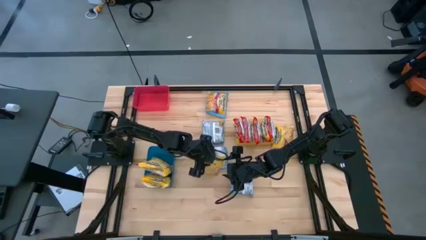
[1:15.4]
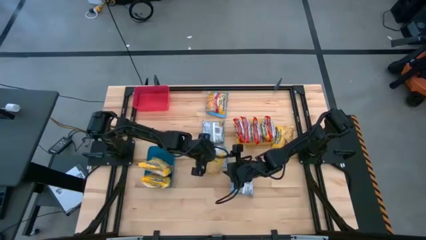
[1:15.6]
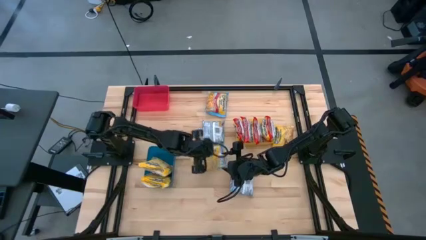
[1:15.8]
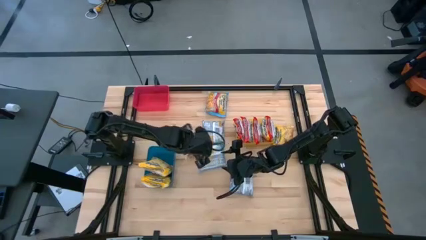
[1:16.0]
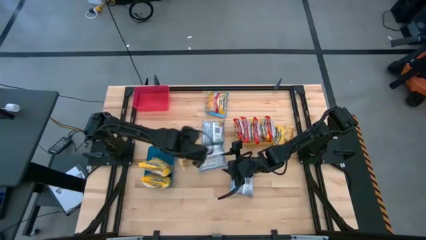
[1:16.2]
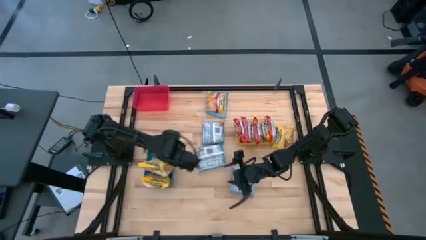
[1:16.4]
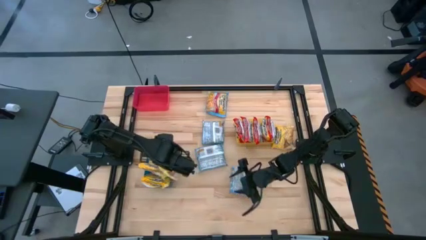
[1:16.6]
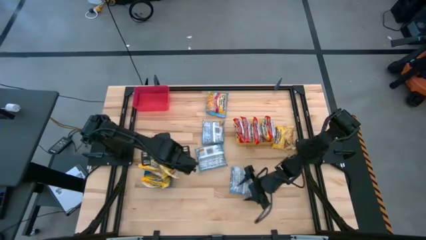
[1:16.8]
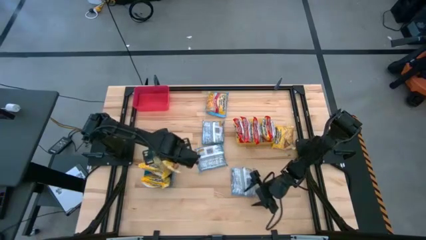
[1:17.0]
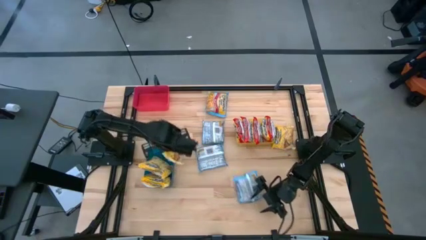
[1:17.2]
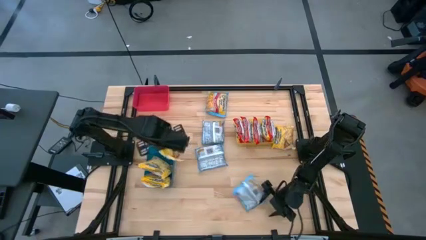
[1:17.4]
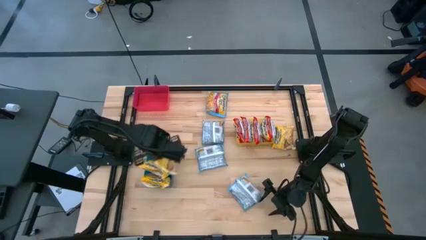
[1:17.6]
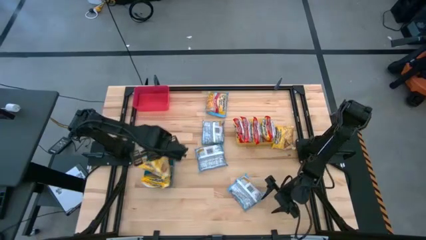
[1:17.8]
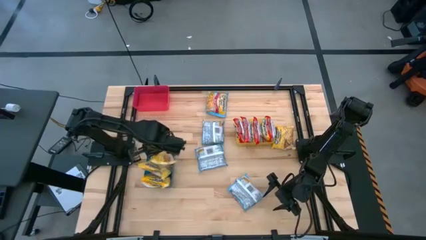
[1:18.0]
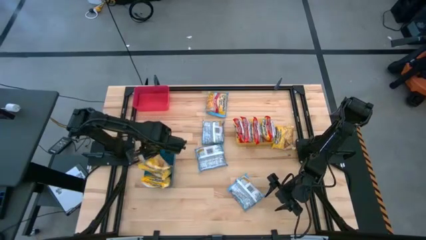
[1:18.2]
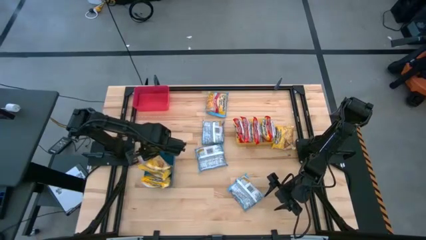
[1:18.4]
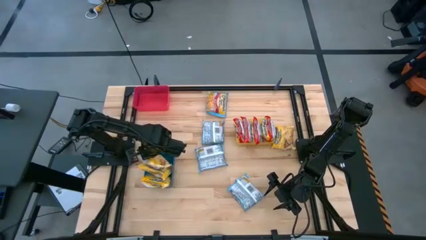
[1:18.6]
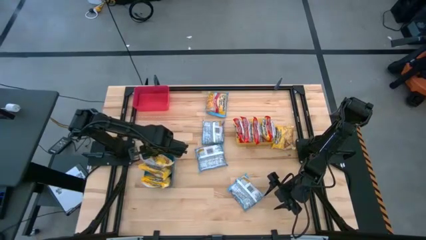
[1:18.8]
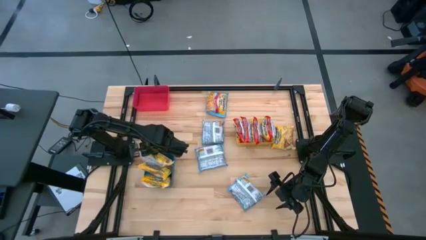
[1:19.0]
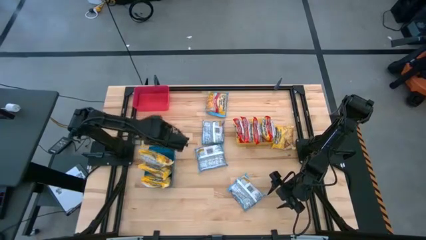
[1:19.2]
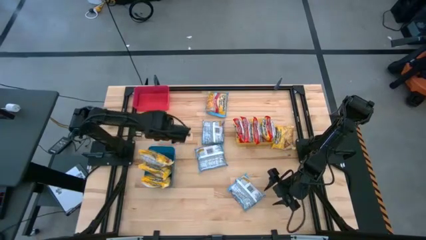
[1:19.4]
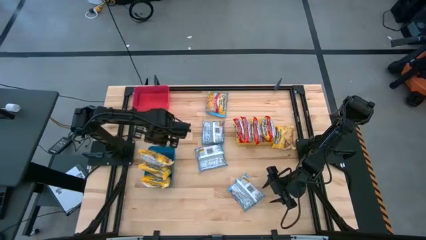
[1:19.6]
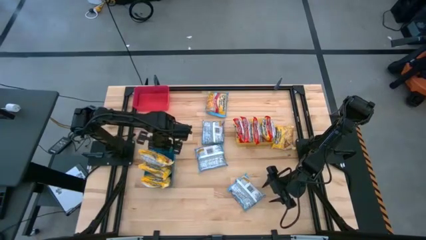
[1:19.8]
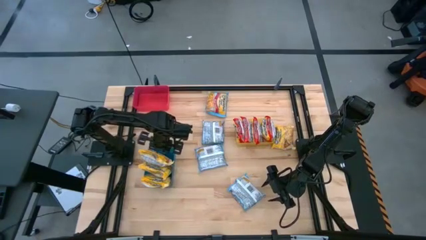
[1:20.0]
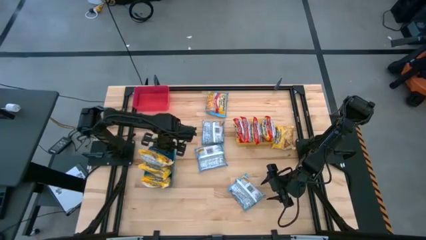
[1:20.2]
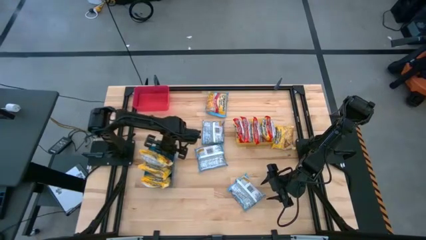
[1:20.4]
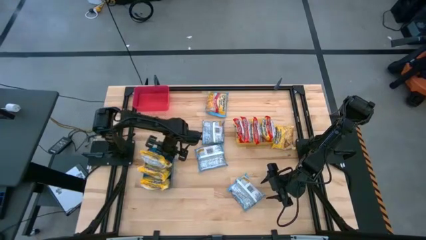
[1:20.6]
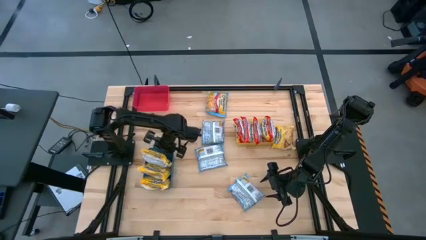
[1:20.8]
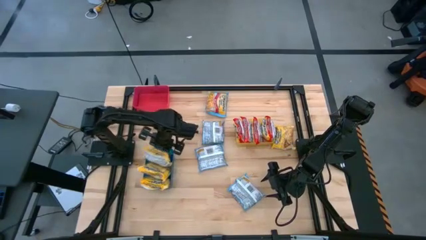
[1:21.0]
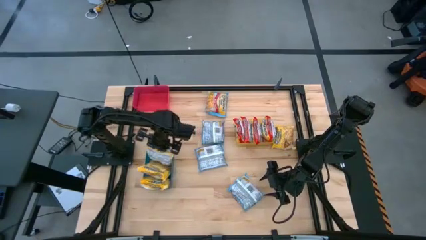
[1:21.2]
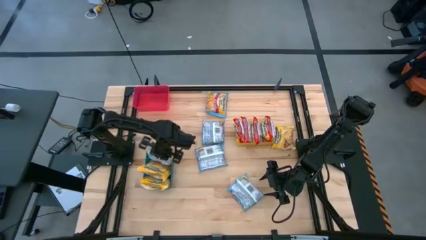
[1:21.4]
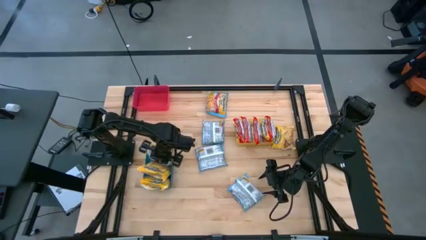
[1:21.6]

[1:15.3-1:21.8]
Task: Sort Maruchan noodles
Put the yellow noodle pack into the blue bin

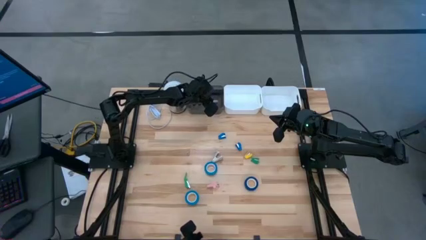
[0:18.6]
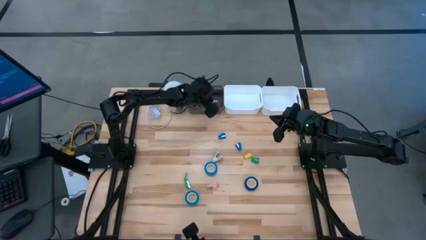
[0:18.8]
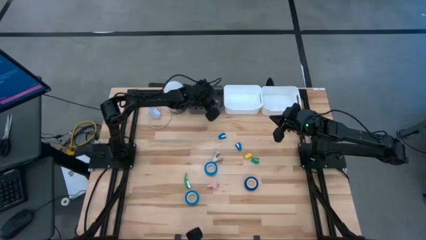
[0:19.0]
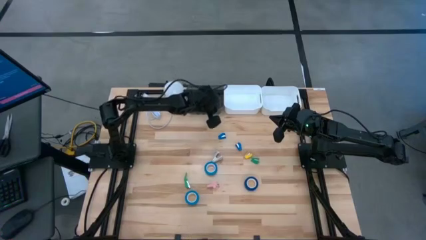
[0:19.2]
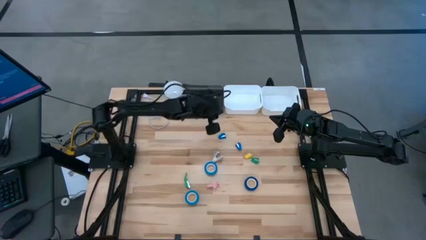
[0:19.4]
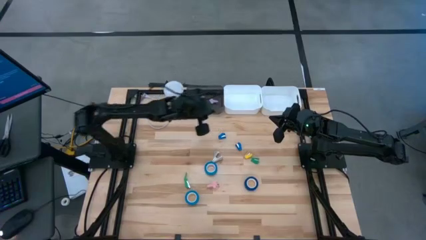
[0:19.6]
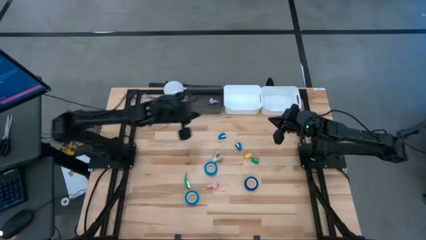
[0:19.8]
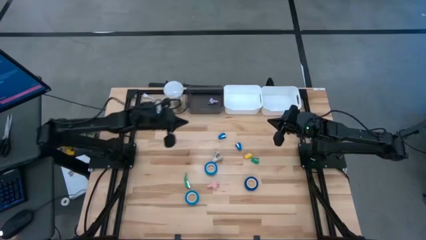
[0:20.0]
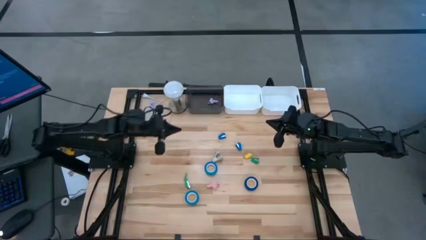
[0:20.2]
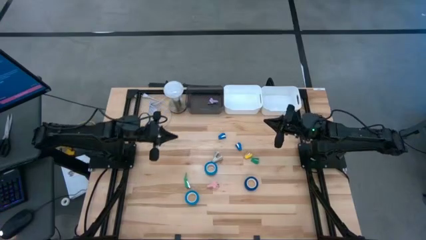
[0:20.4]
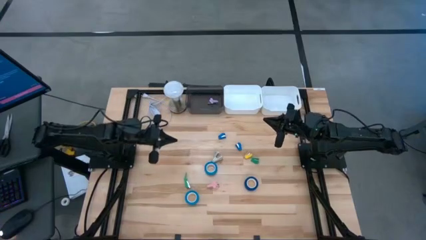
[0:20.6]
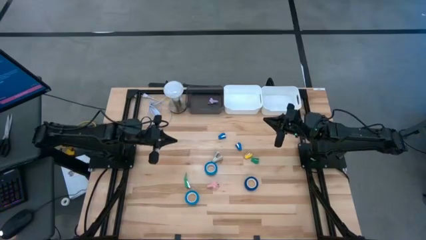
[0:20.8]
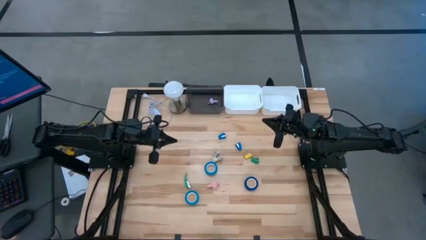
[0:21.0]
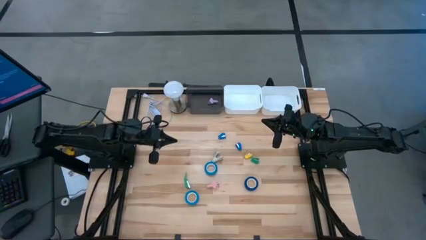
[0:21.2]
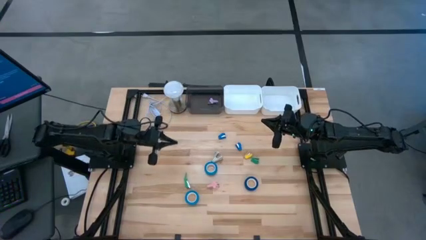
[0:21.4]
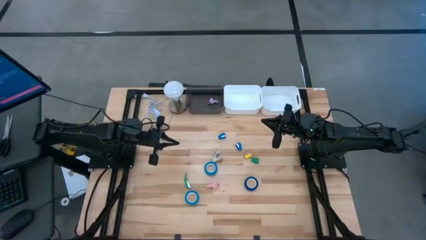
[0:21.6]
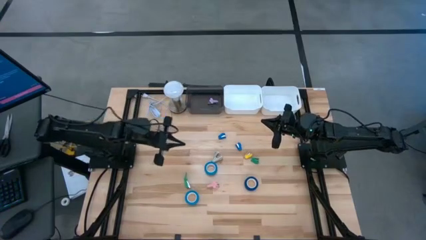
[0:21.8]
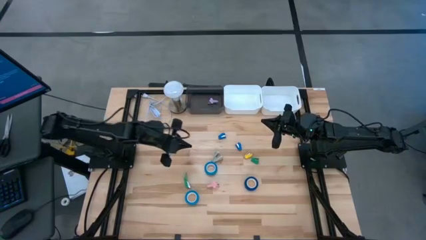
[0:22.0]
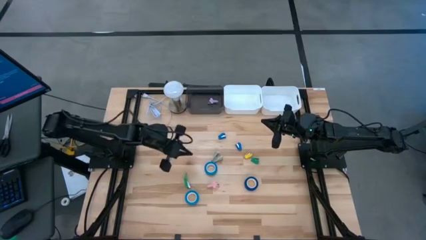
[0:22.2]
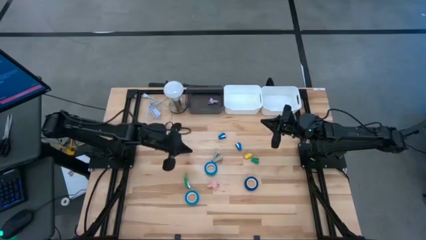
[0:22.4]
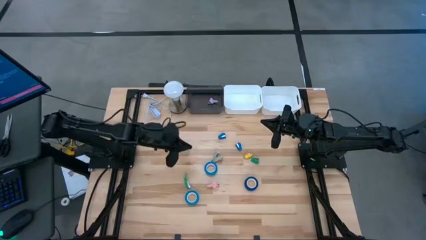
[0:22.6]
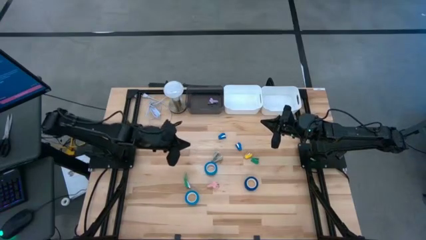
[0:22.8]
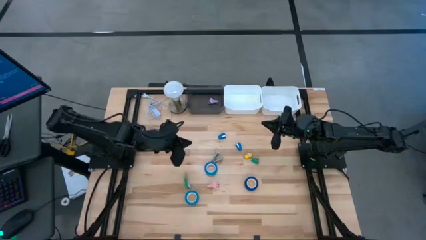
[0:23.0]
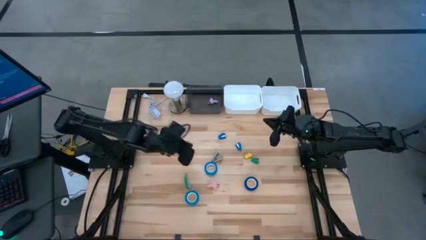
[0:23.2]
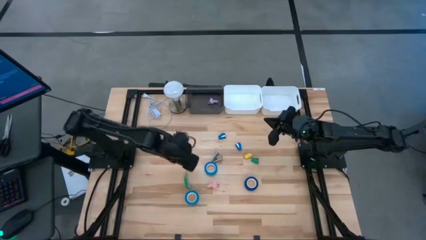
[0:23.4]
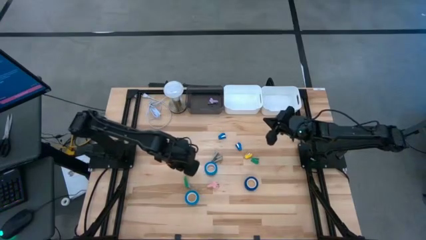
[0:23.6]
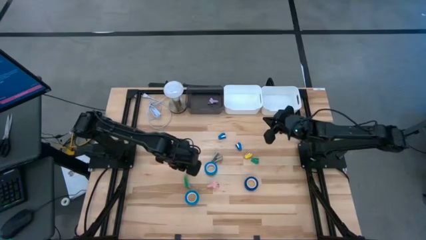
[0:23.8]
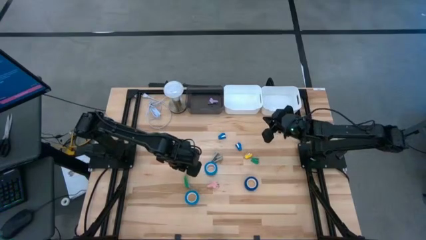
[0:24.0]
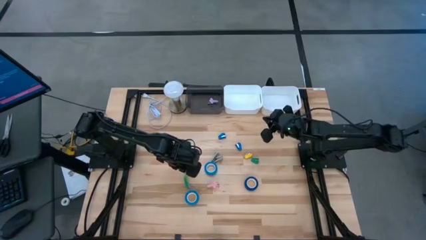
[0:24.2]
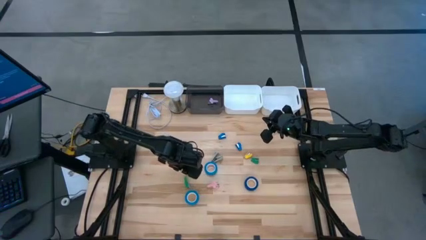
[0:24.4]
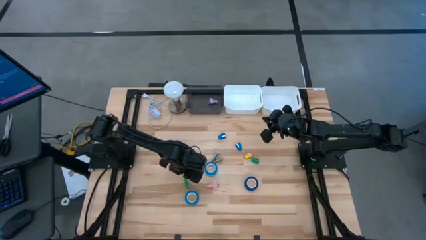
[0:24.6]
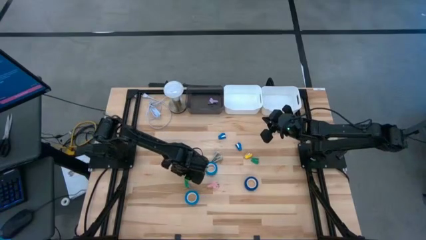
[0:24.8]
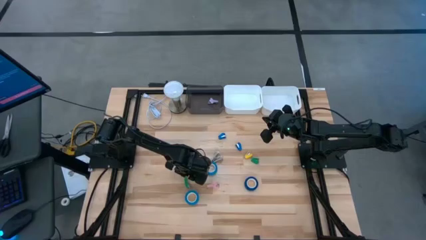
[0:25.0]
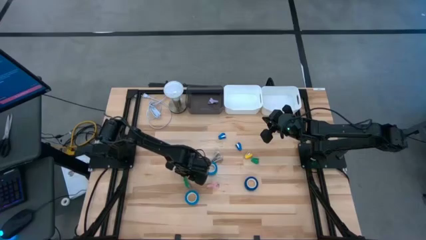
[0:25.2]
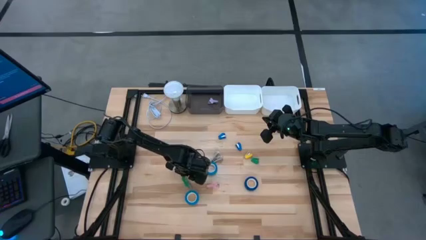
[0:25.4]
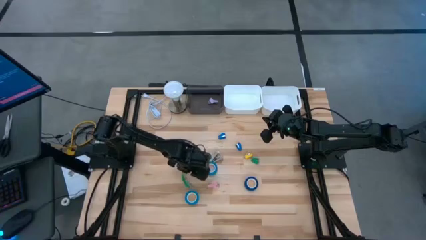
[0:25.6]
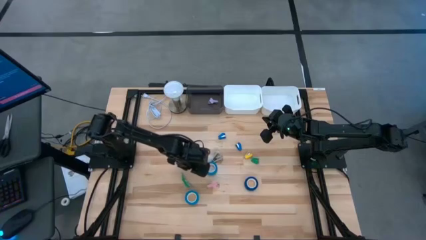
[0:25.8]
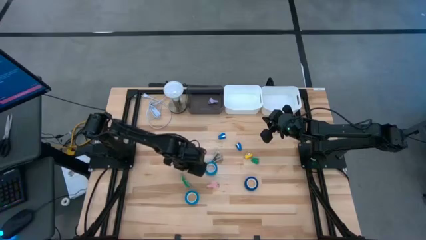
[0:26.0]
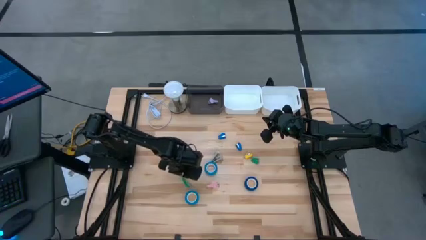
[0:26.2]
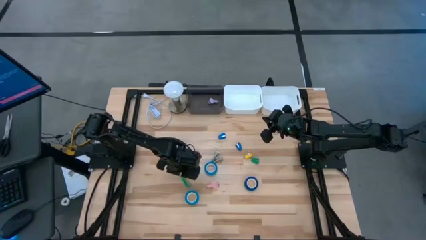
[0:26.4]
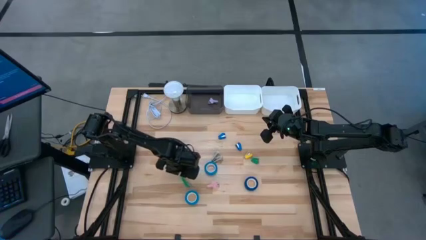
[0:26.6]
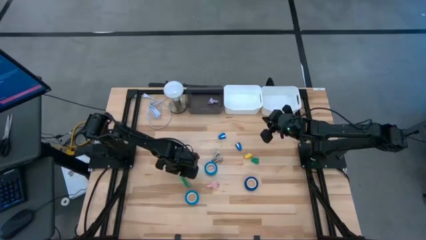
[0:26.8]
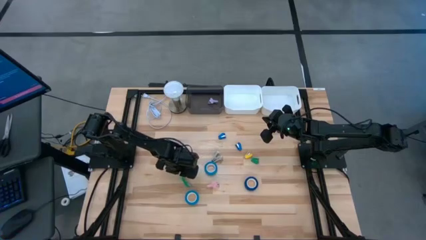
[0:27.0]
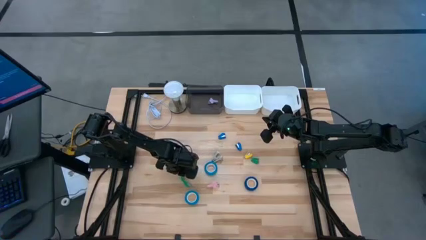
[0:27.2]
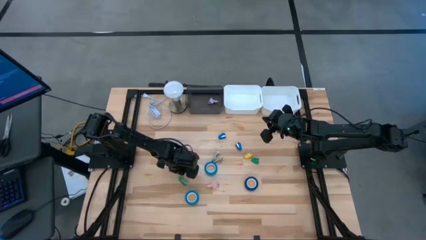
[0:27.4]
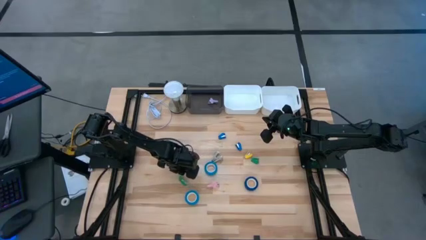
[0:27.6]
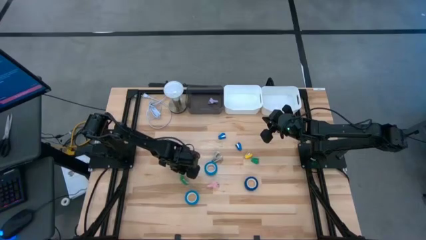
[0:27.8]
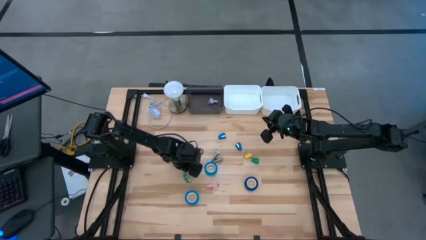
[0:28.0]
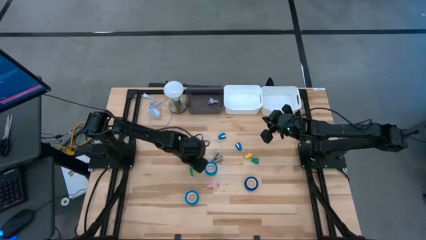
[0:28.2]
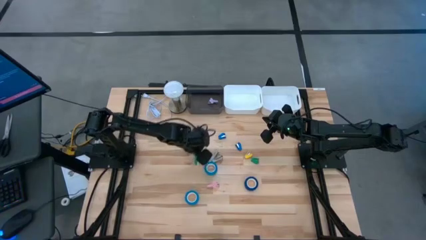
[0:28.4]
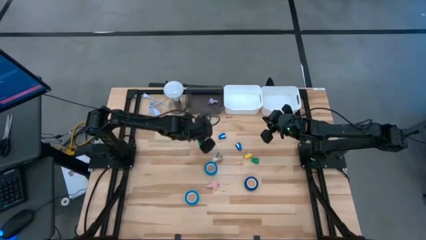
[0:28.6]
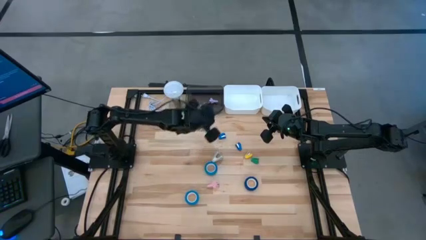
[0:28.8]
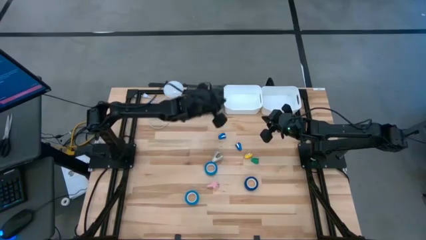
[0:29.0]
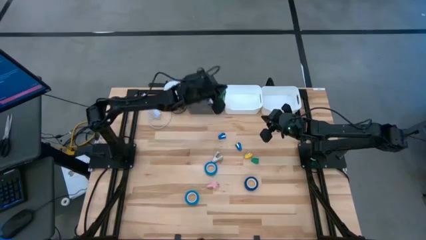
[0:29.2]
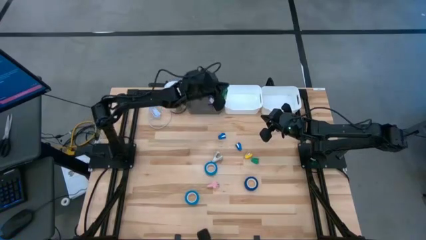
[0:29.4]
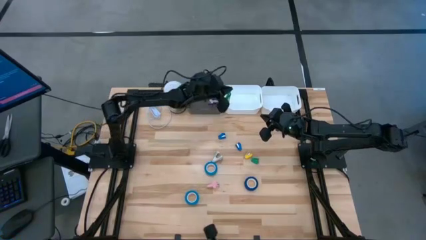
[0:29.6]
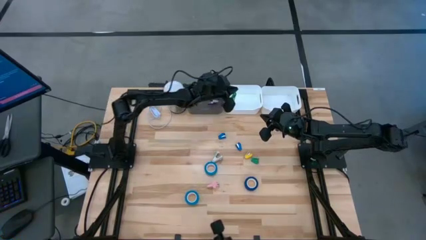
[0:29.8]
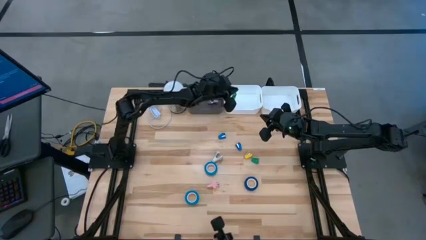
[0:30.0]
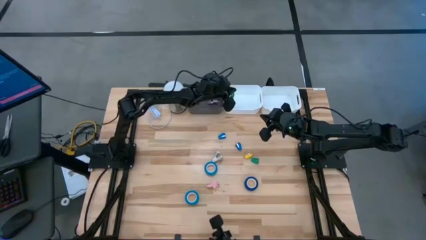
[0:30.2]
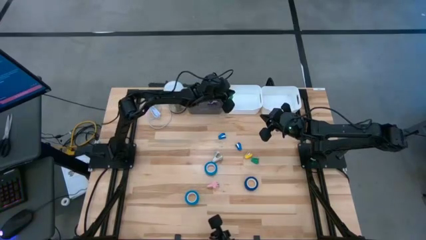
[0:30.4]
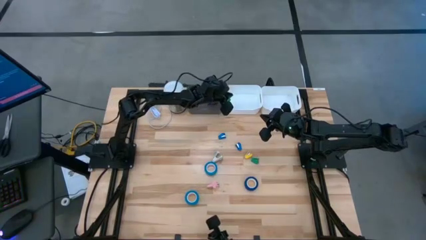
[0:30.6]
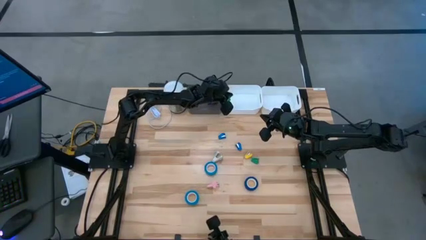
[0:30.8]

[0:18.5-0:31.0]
Task: Pick and place Stapler, Stapler remover, tape
Put the left green stapler into the left white bin
